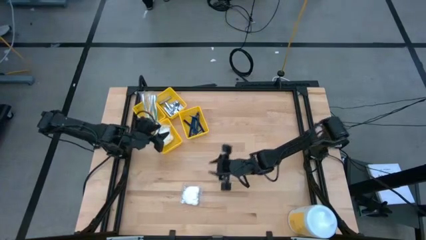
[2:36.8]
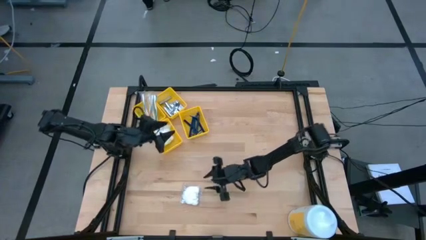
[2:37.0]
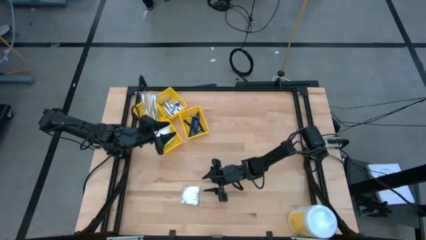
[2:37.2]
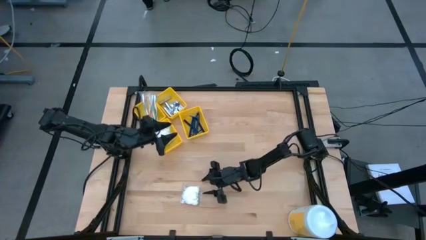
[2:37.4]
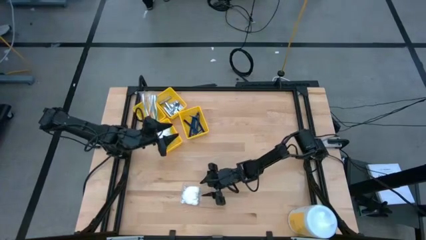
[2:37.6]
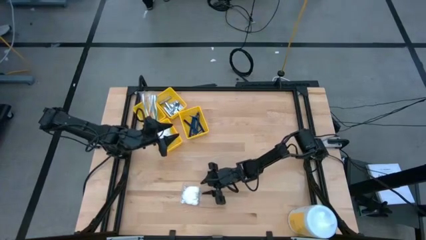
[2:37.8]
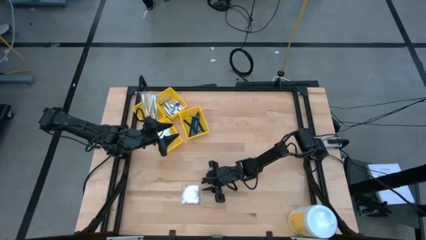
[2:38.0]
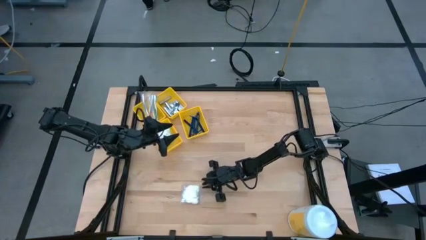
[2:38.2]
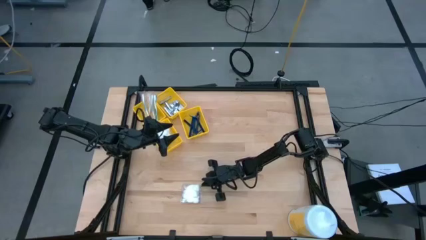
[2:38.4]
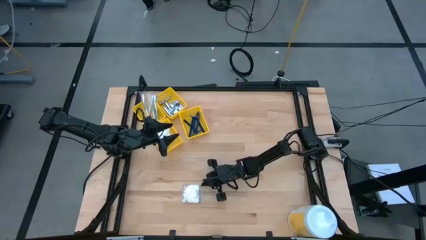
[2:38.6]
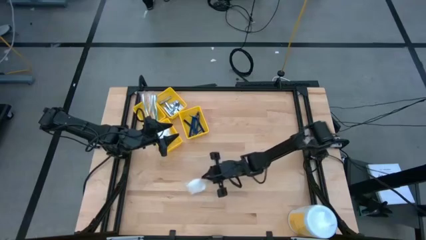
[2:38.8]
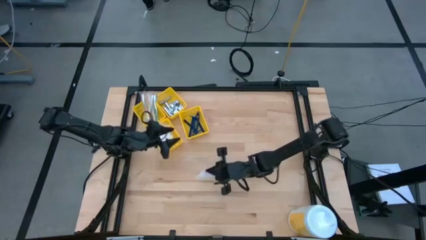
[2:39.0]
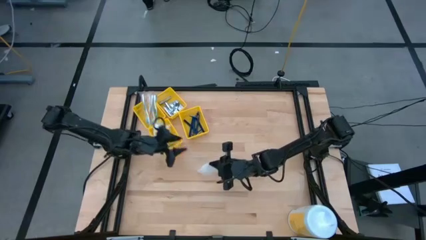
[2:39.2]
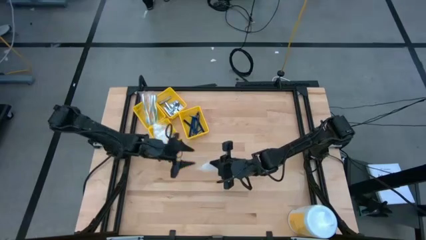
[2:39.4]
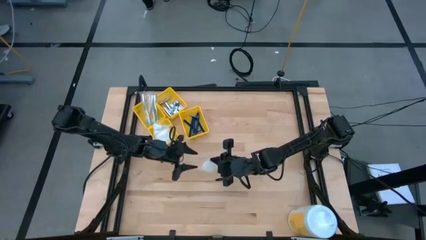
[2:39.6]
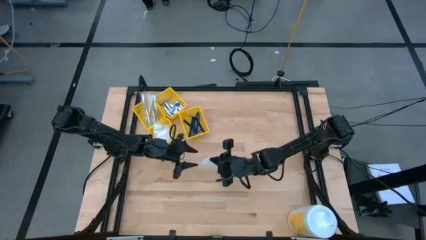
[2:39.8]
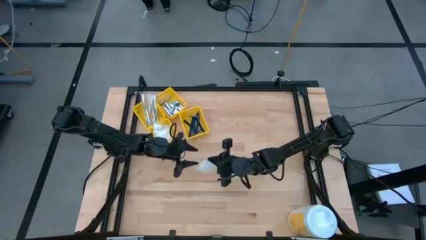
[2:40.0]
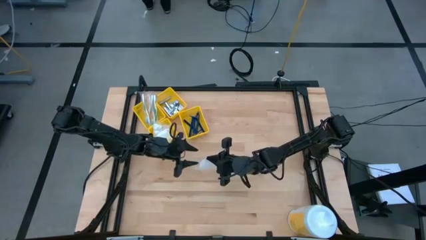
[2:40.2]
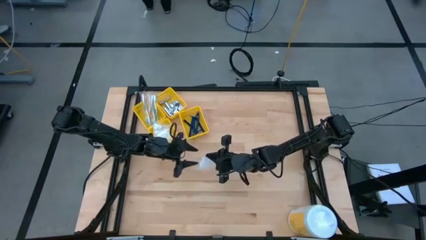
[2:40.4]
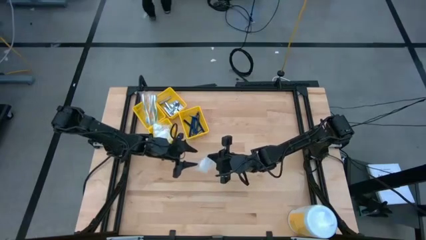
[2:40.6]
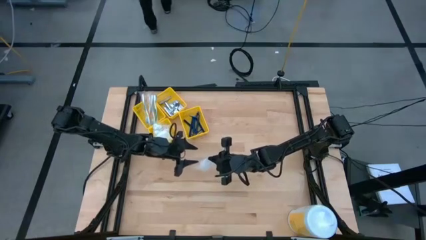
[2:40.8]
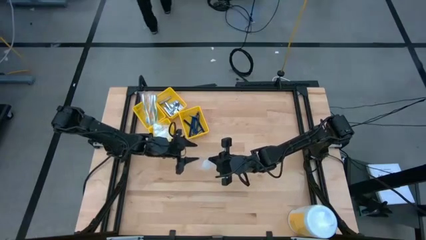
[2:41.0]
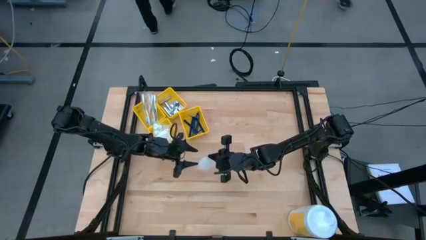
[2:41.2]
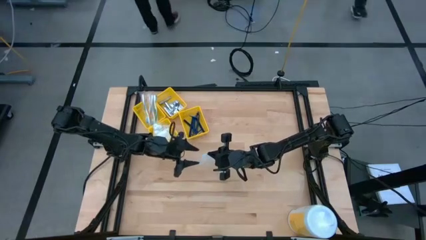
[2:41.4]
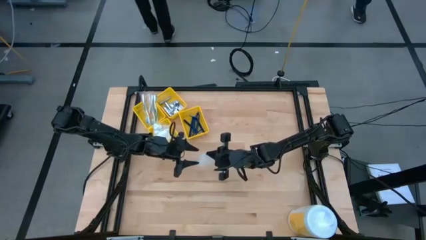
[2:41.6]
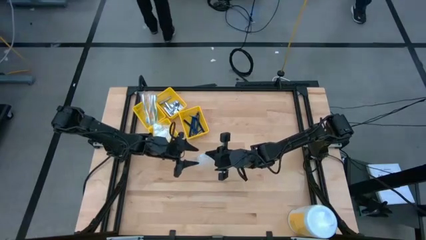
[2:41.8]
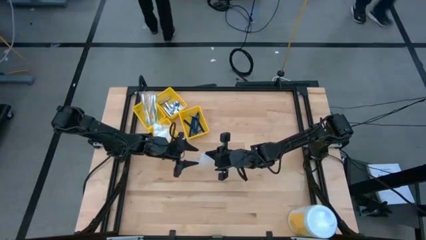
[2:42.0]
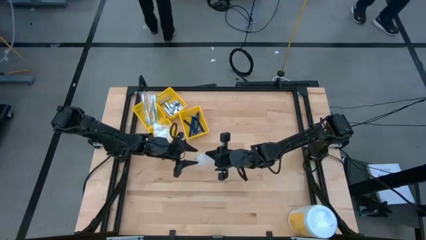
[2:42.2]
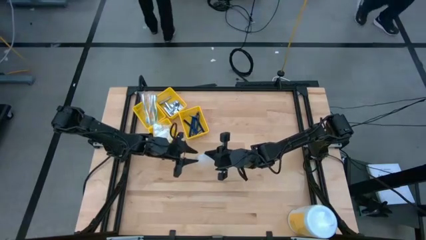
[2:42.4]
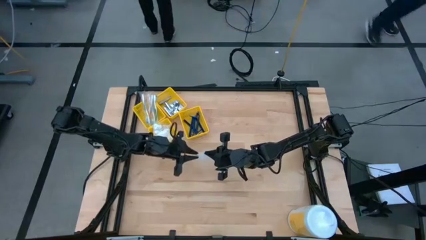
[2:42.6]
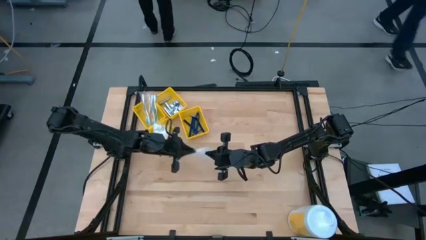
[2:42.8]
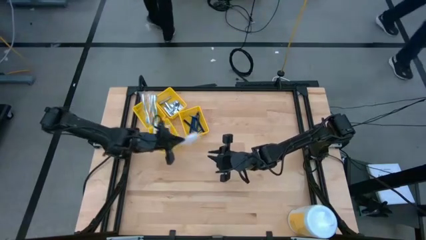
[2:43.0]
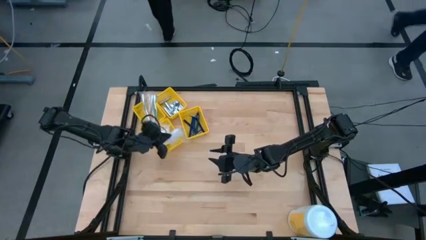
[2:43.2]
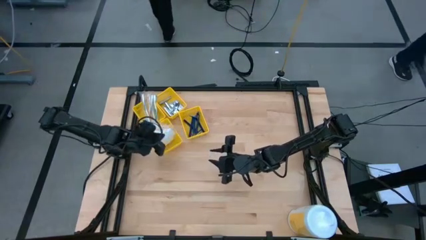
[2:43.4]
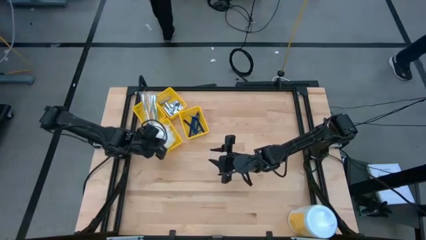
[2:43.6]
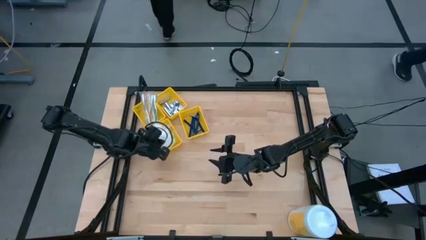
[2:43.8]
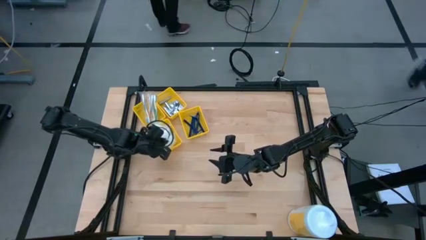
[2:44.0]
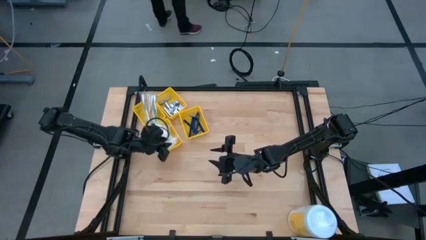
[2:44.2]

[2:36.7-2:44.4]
Task: Pick & Place Travel size toiletries
Put the cotton pack into the bottom yellow bin

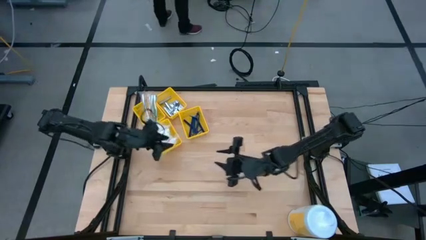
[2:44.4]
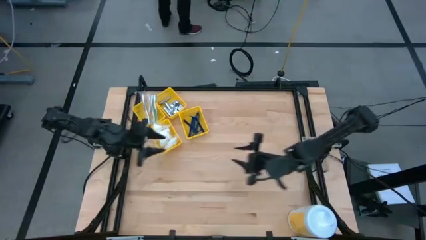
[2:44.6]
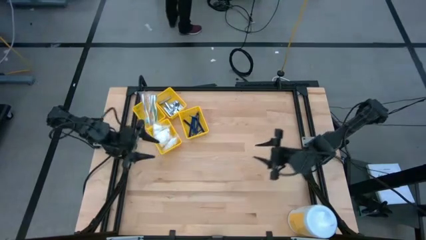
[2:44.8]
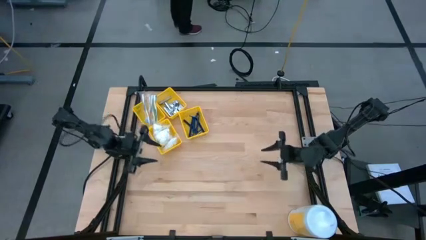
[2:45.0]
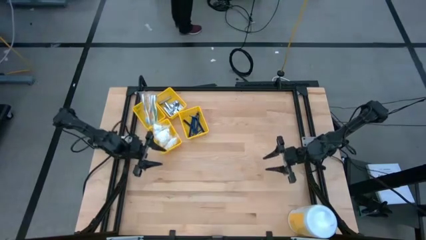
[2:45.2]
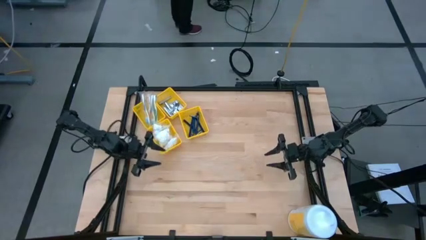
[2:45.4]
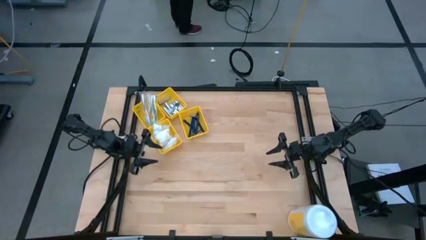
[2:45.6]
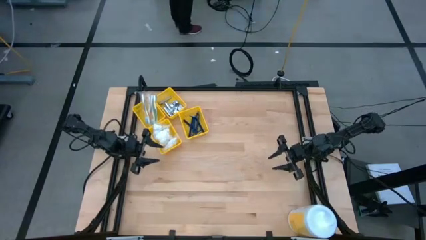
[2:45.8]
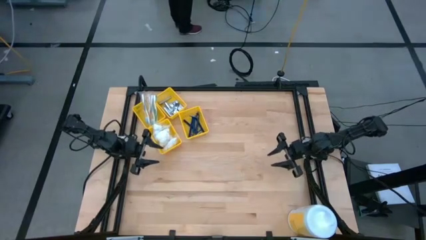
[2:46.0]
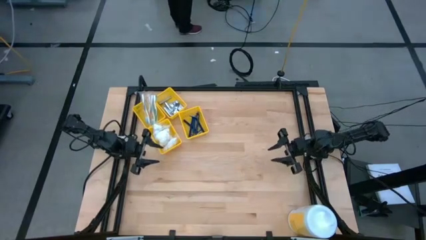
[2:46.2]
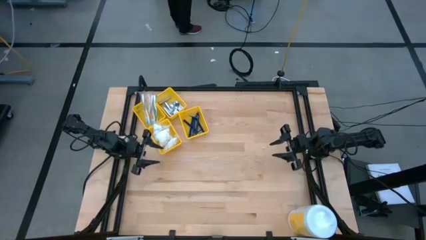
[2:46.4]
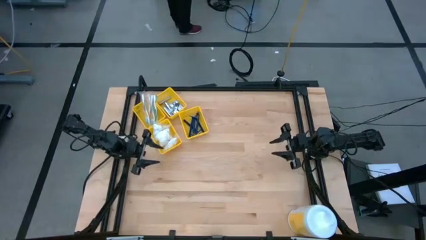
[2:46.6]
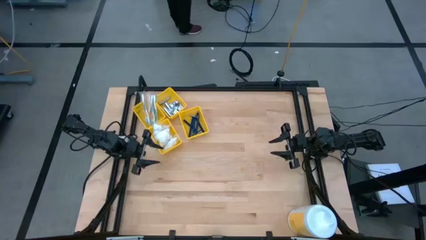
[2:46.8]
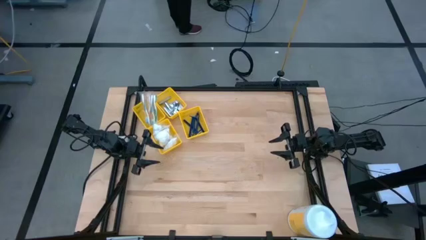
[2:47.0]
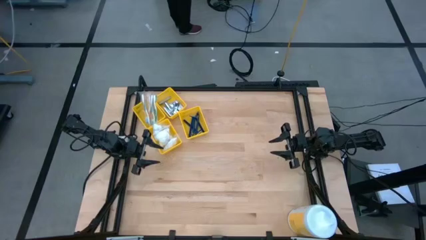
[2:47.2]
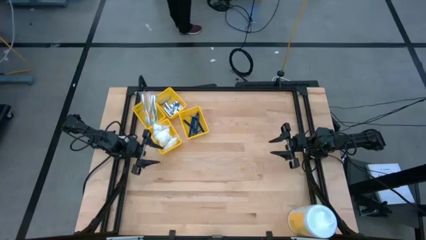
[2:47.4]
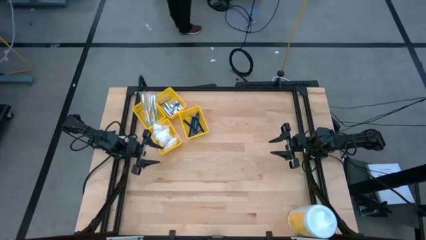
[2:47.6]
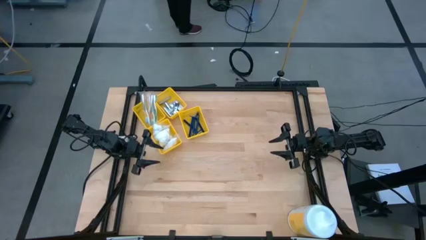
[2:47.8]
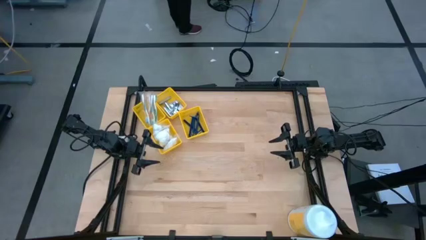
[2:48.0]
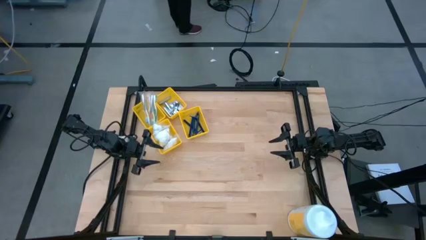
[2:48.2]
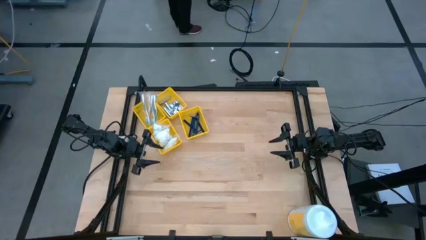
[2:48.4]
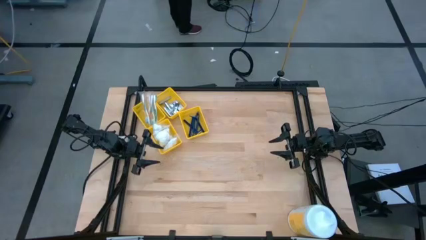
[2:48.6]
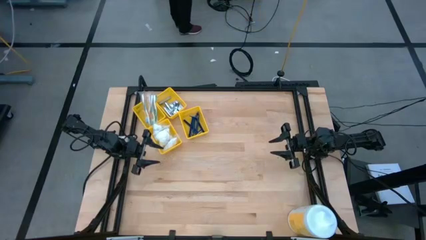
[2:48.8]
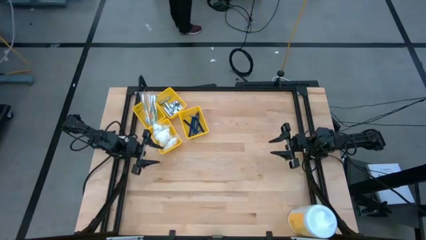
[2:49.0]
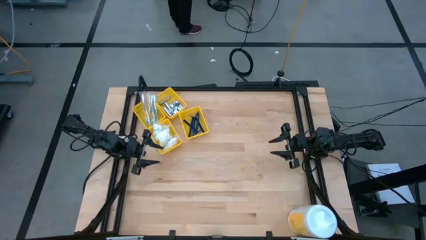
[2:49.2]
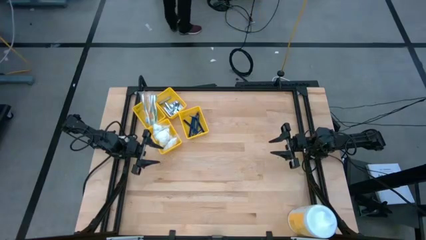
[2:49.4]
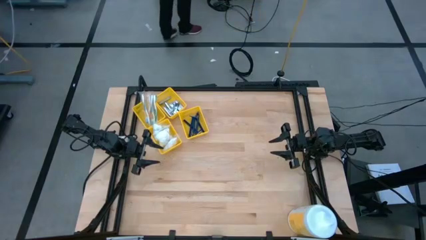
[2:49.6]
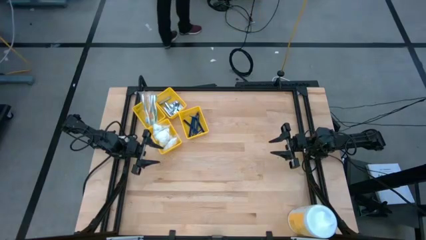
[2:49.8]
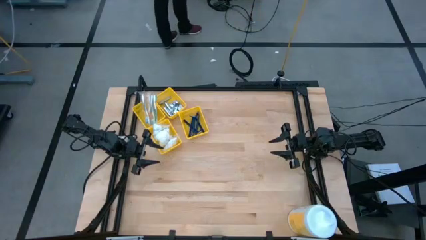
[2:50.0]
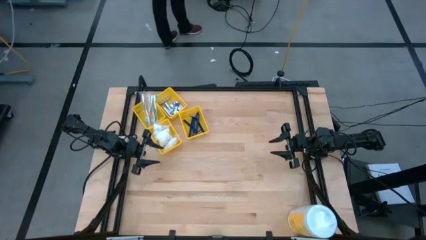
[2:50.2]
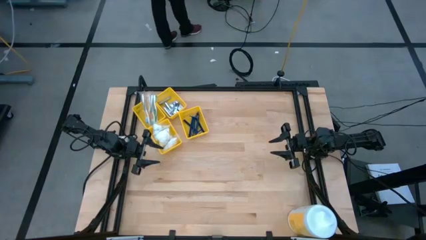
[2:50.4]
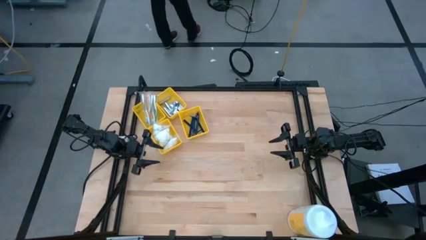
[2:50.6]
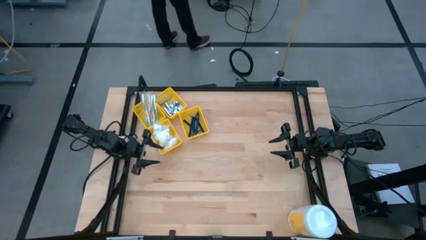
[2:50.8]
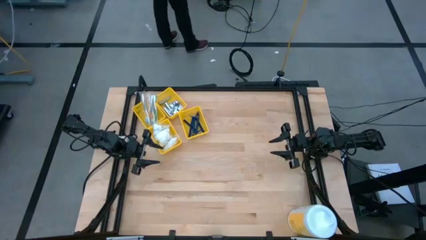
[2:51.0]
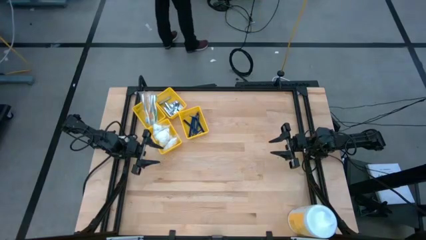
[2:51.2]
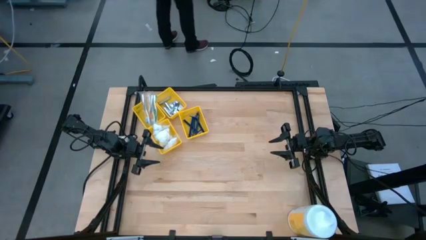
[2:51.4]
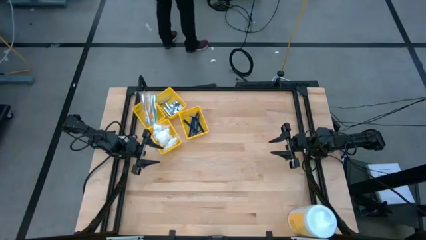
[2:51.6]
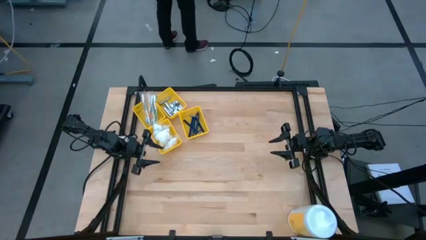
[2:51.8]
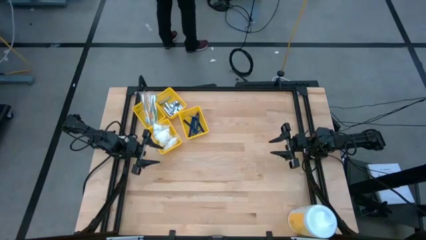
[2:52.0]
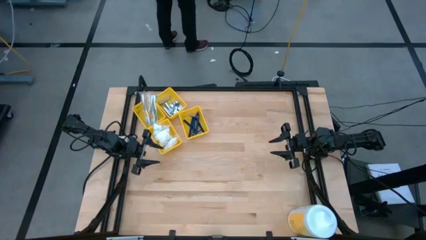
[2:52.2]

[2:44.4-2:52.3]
Return to Home Position

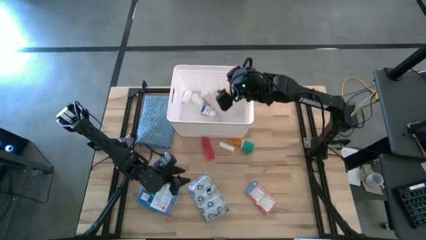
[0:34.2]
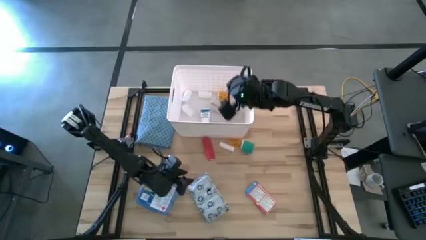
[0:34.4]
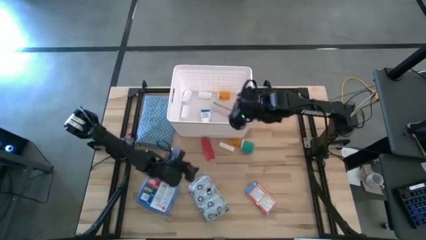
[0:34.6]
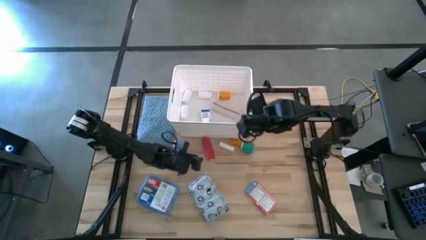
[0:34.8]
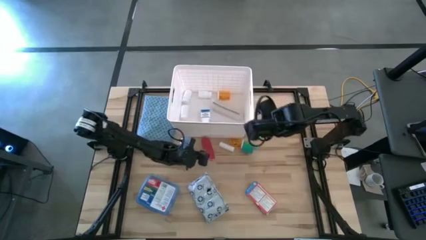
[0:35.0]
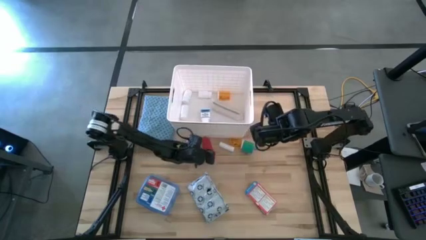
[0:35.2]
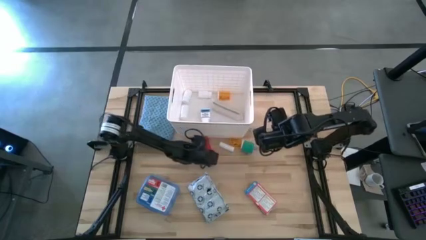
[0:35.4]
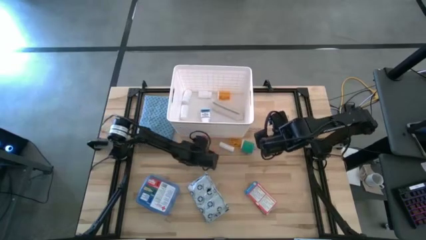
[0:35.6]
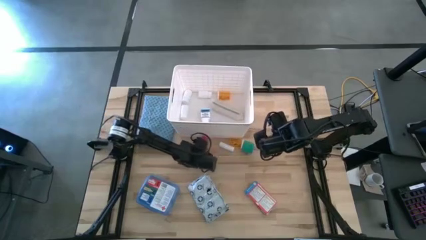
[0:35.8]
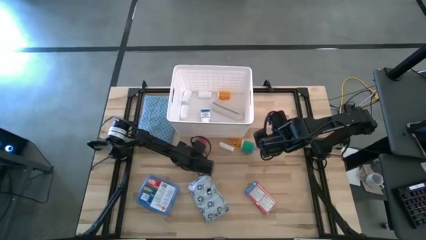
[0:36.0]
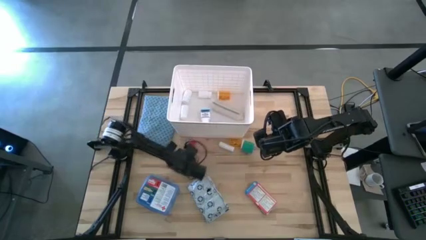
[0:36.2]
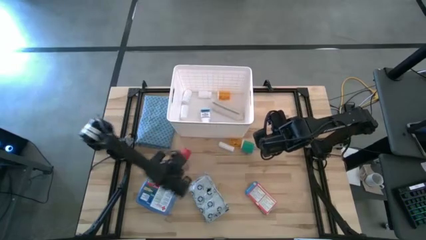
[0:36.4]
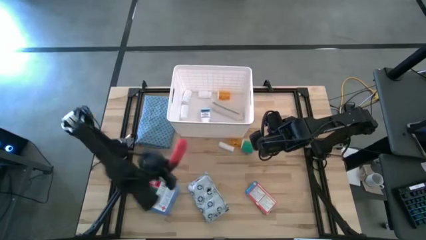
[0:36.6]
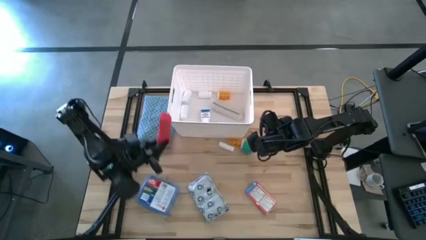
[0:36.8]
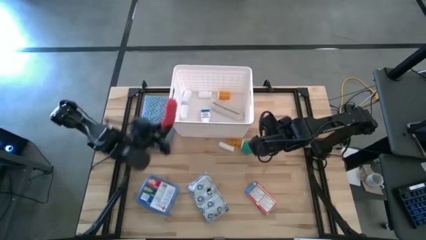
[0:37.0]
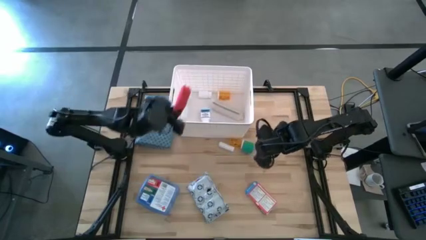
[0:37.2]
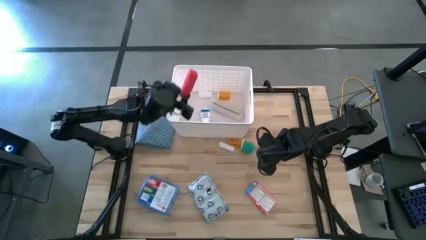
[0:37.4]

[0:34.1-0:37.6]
Task: Pick & place medical supplies in basket/bin
Put the red rolled bandage in the white bin
